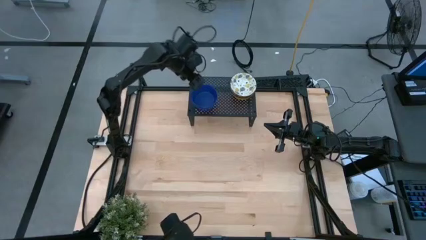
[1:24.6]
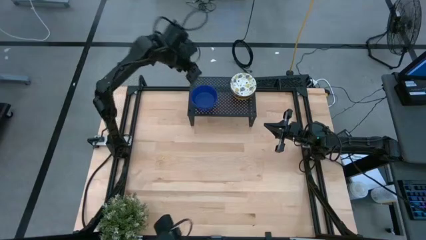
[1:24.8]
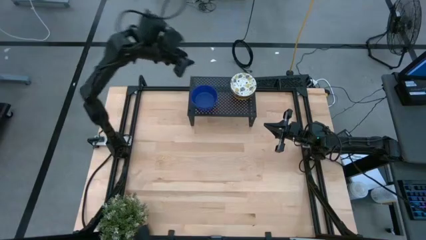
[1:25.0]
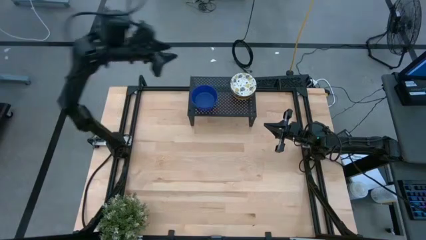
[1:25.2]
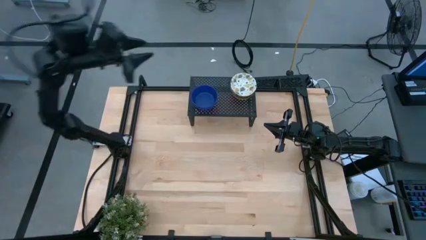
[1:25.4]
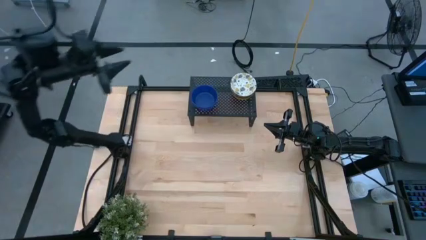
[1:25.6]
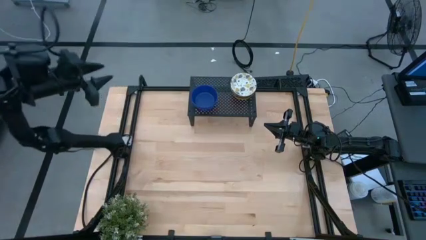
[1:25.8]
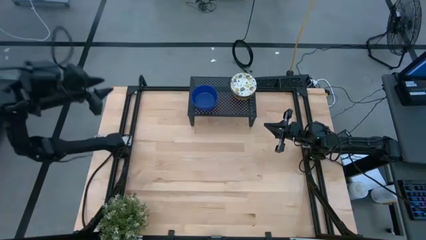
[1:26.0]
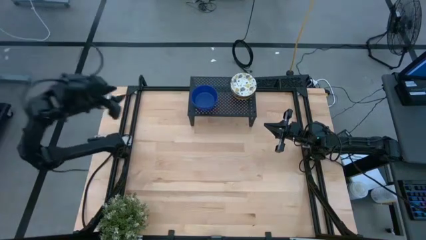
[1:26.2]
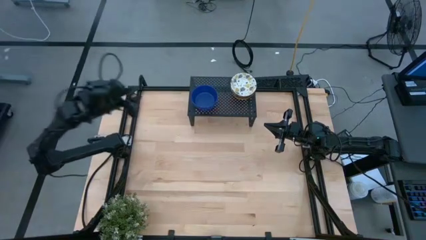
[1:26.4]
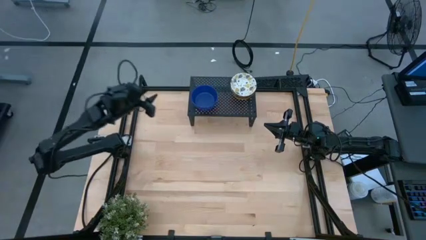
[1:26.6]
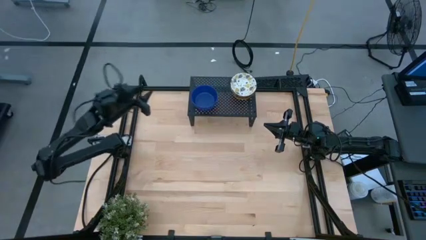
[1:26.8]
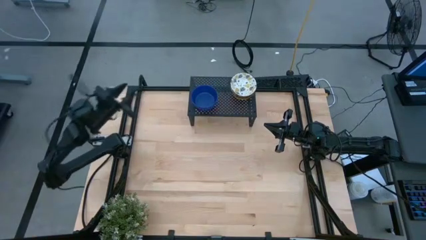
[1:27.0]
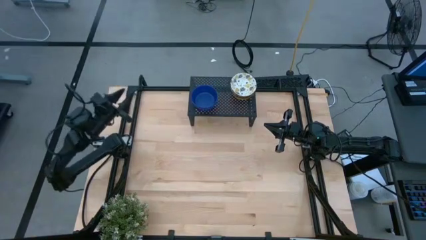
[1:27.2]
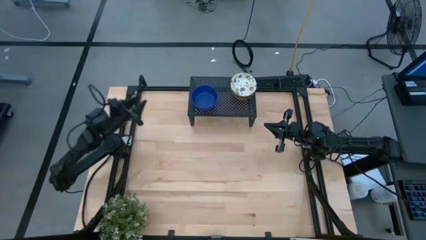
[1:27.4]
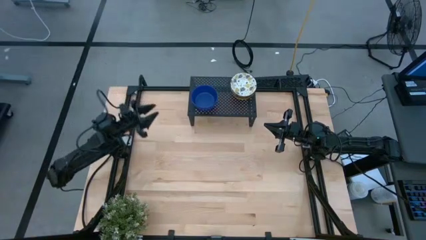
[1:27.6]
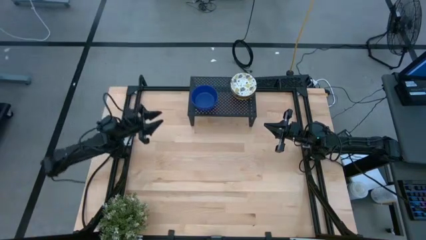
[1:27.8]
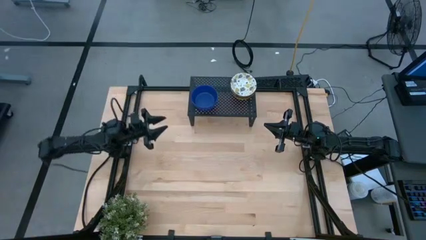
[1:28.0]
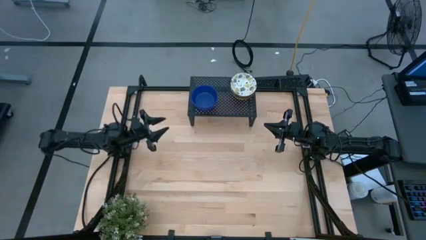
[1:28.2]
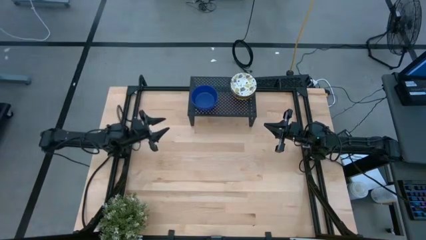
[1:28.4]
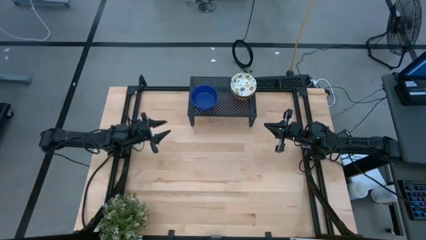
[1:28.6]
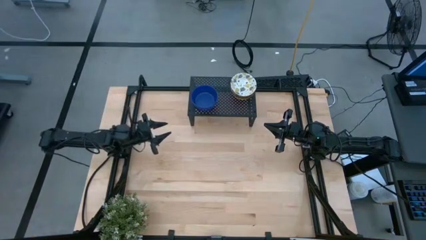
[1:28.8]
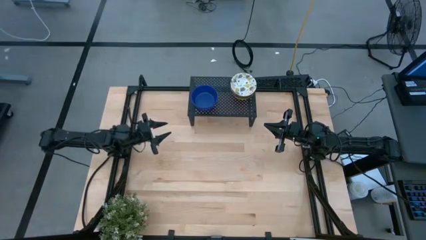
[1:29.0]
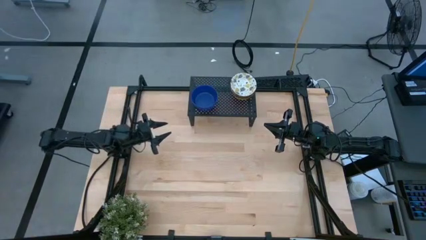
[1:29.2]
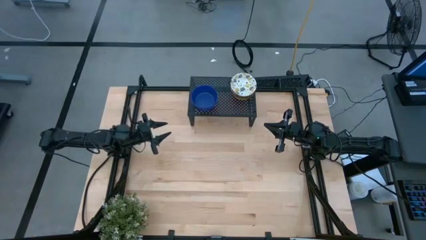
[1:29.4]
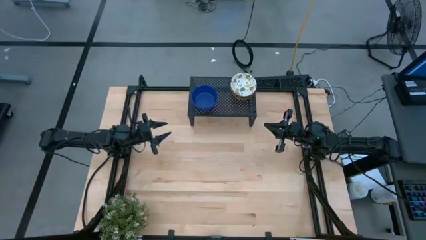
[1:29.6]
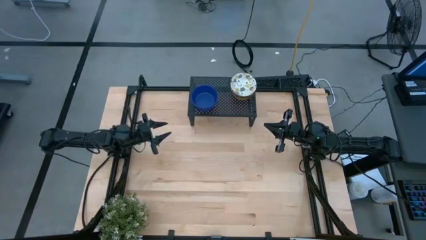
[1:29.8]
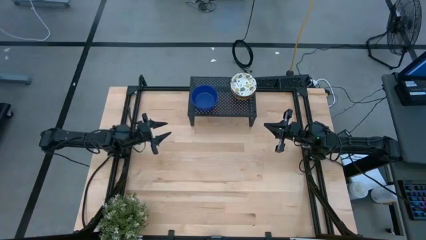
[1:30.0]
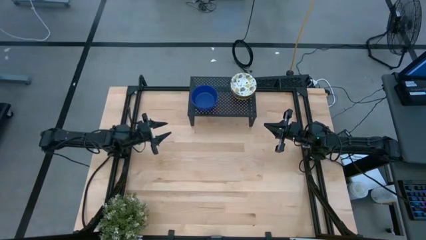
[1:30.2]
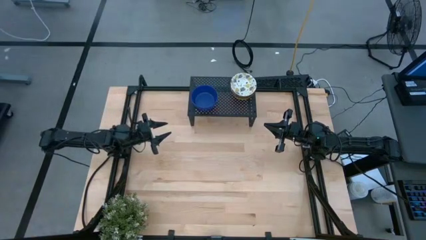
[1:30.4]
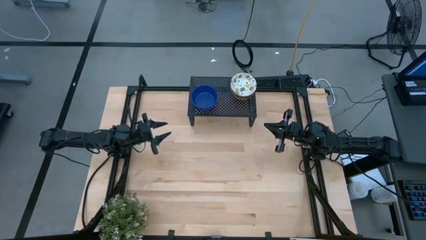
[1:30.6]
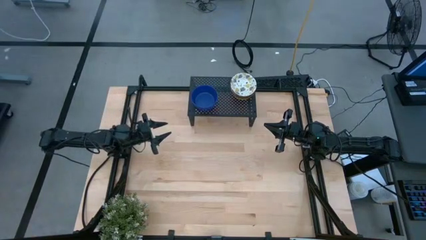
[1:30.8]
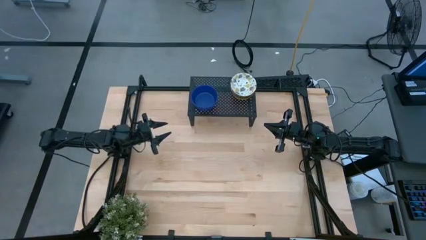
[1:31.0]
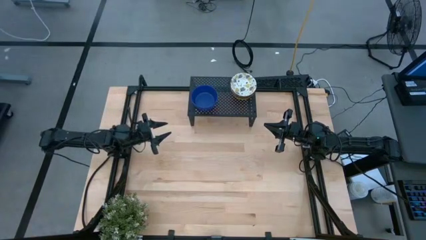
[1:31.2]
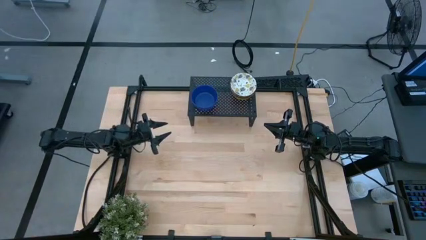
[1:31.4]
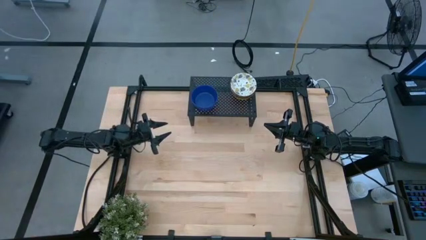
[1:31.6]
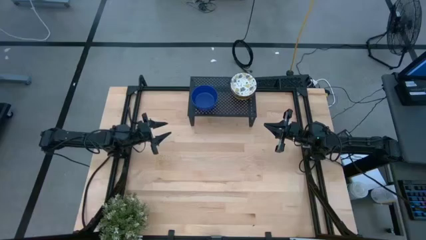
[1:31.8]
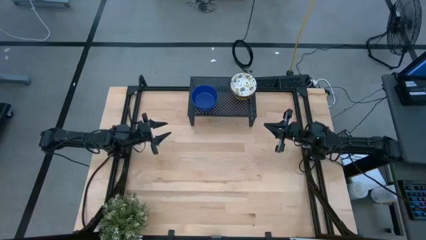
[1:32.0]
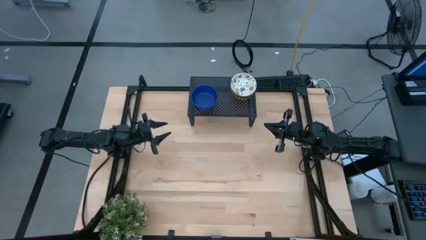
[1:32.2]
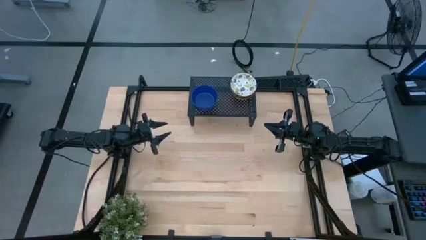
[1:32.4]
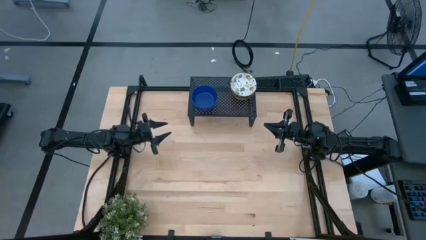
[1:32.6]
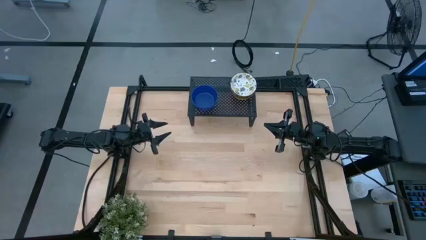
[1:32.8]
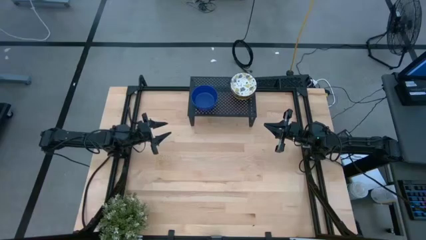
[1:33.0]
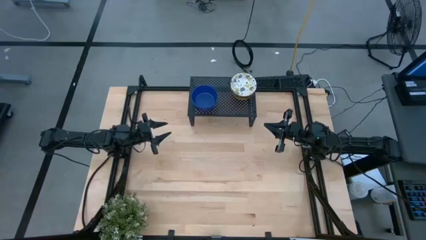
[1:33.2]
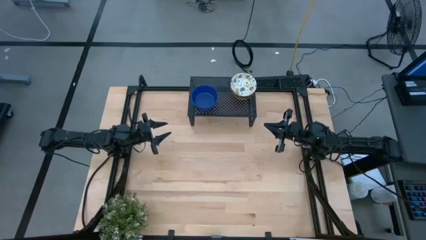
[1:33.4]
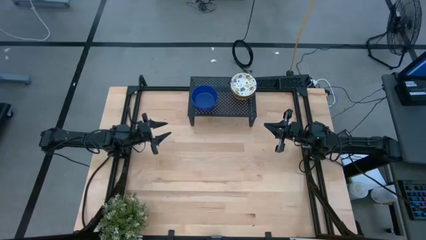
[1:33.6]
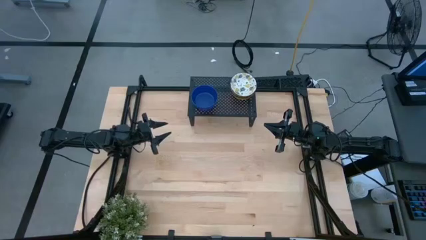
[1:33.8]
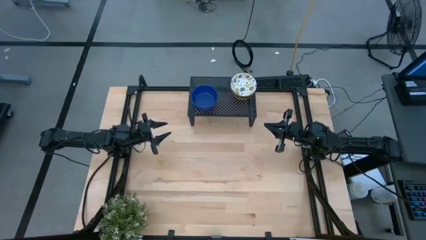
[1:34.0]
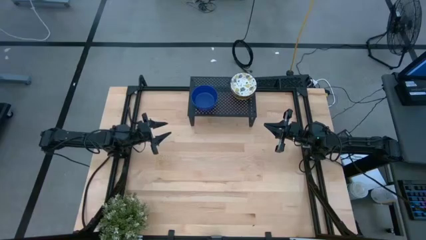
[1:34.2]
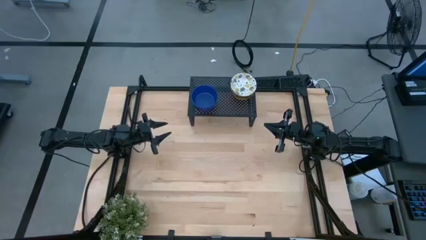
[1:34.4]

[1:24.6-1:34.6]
Task: Pick & Place Mini bowls
Return to Home Position
